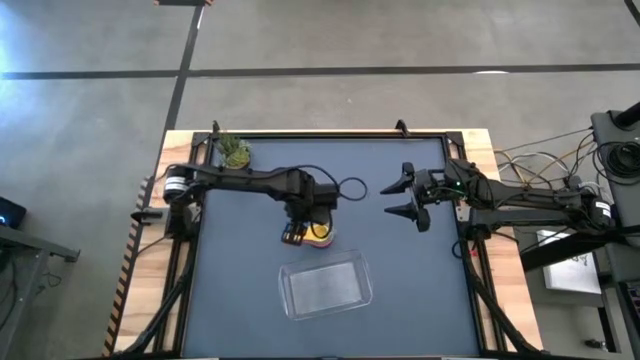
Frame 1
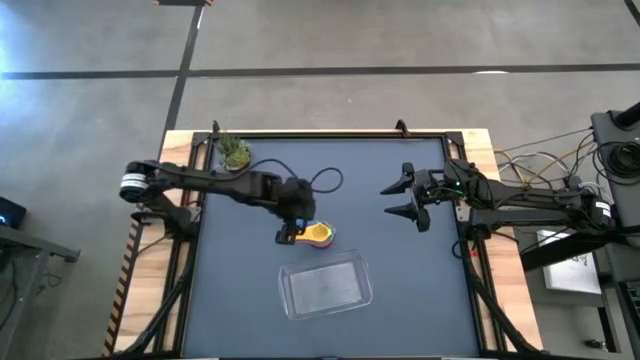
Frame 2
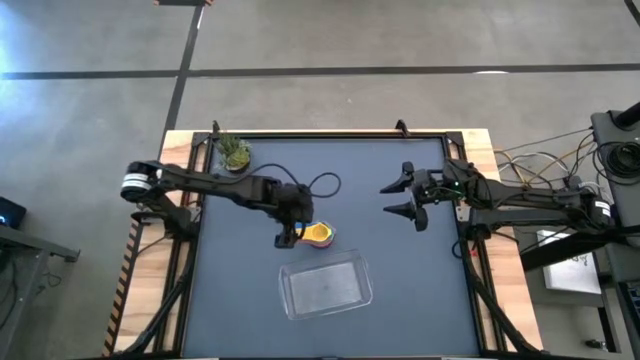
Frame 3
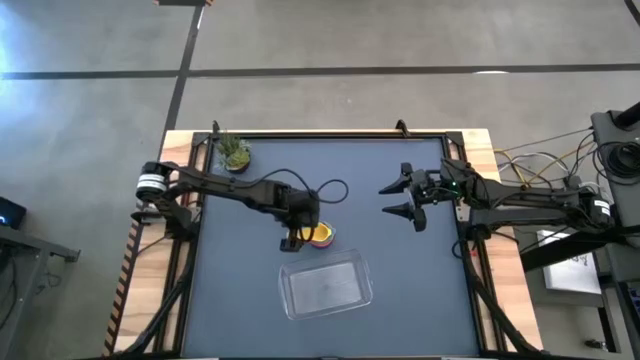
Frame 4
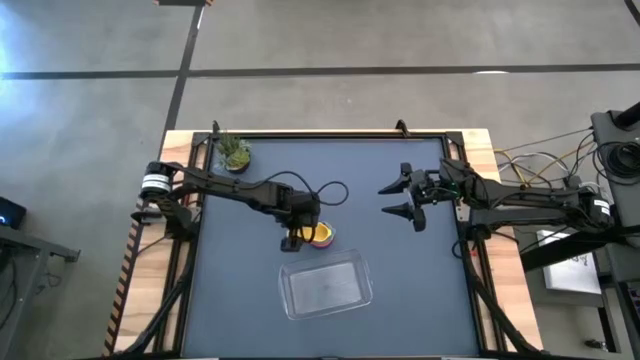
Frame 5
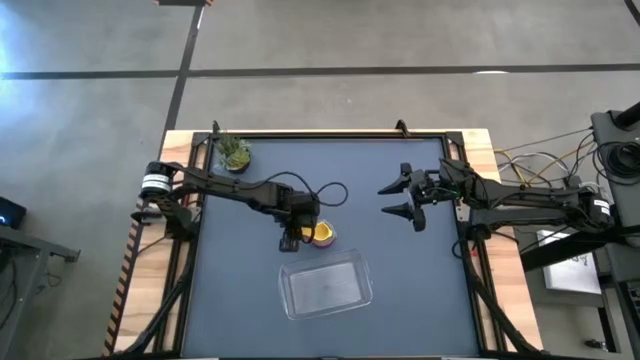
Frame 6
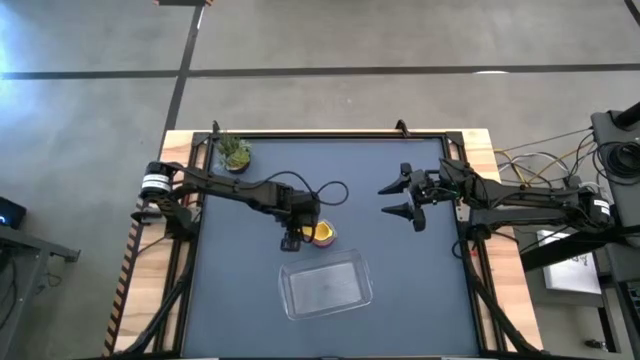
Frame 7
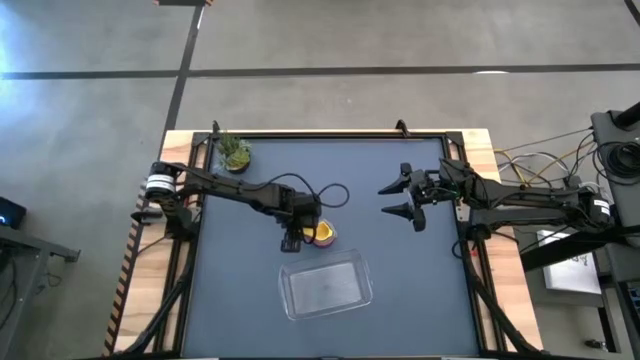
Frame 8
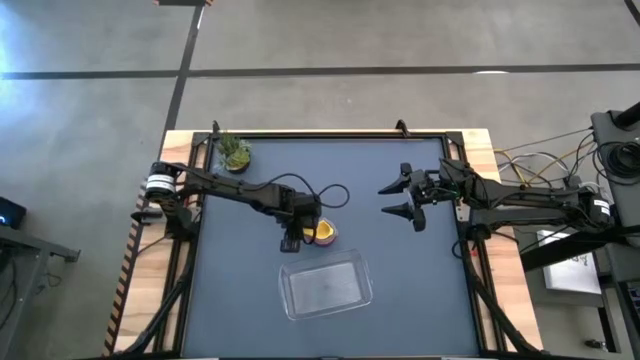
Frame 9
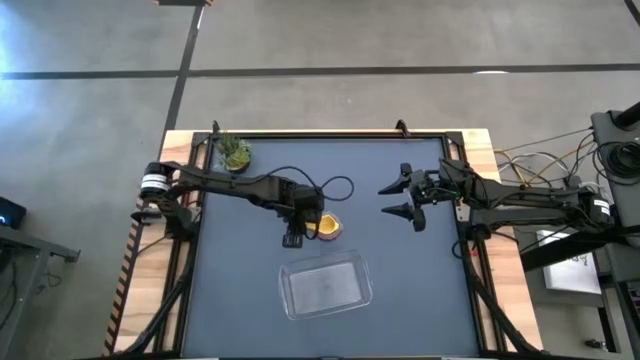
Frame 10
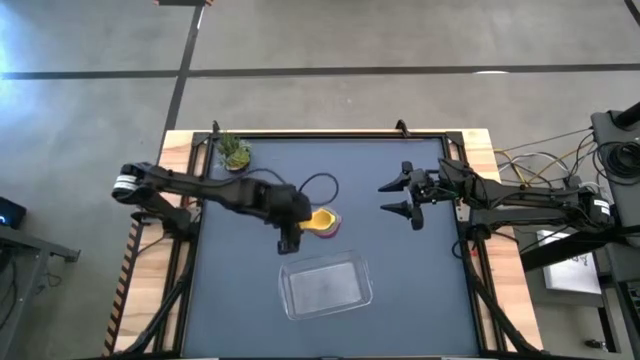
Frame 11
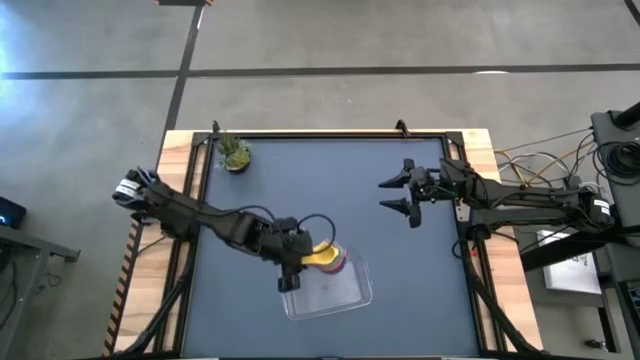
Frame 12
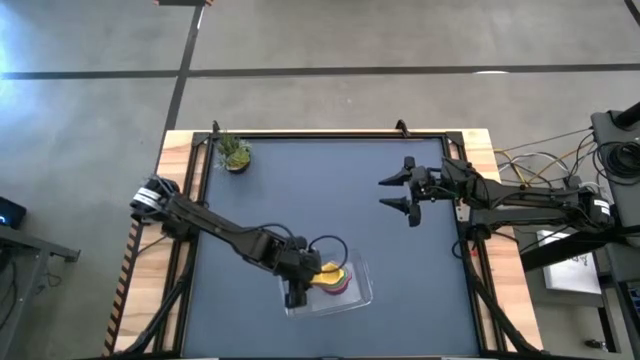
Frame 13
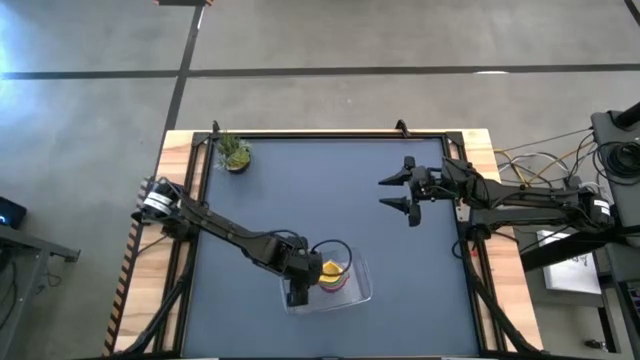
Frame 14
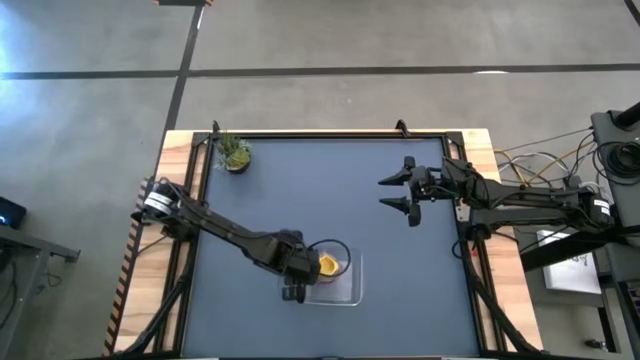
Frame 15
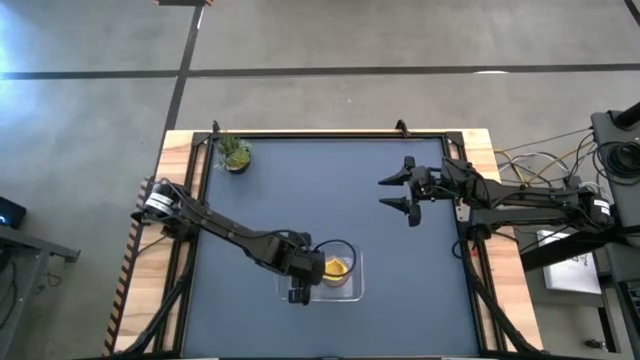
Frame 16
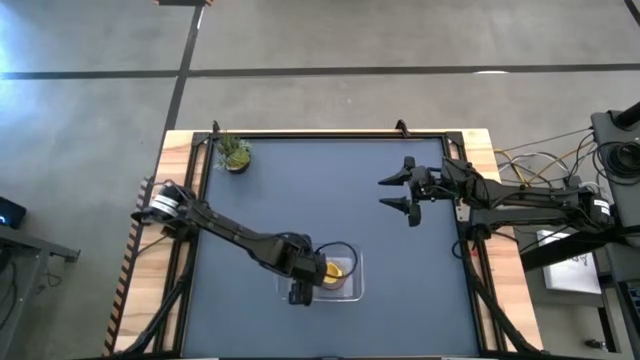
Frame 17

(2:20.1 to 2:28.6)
Task: Nest measuring cups in basket
Put the nested measuring cups into the transparent bin

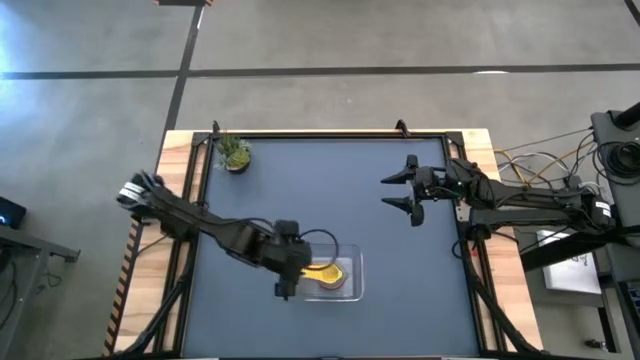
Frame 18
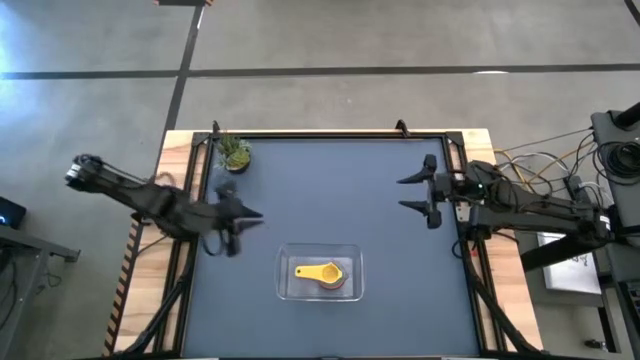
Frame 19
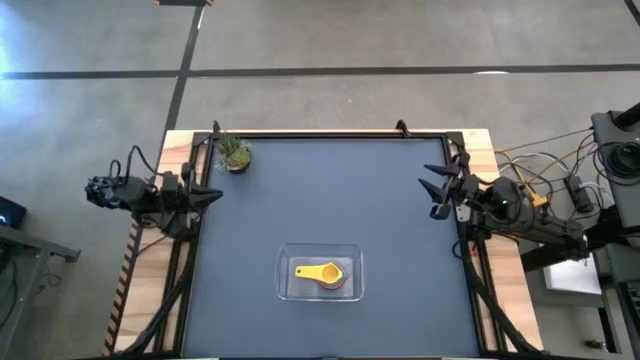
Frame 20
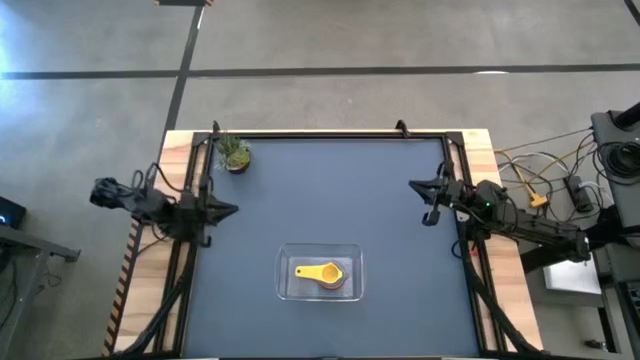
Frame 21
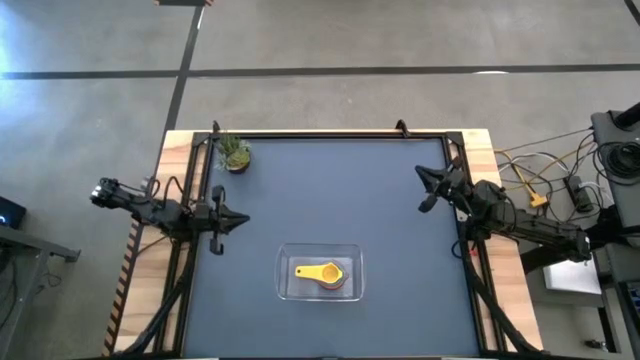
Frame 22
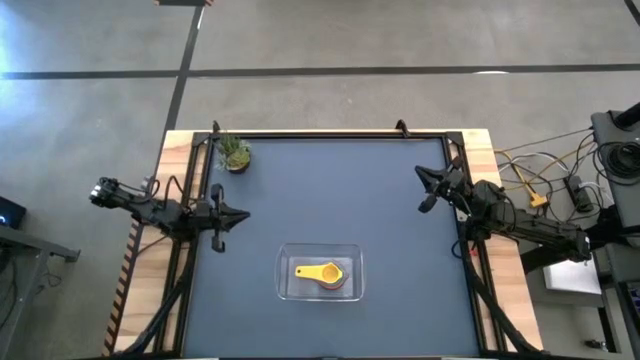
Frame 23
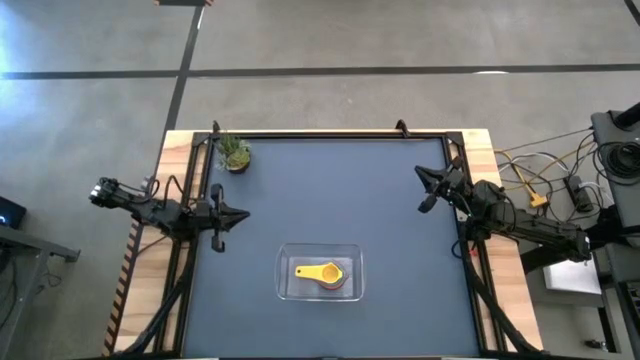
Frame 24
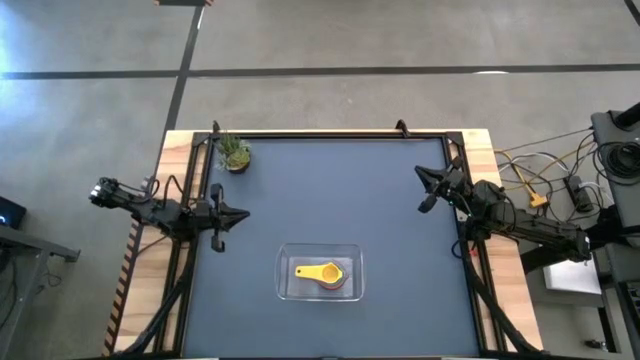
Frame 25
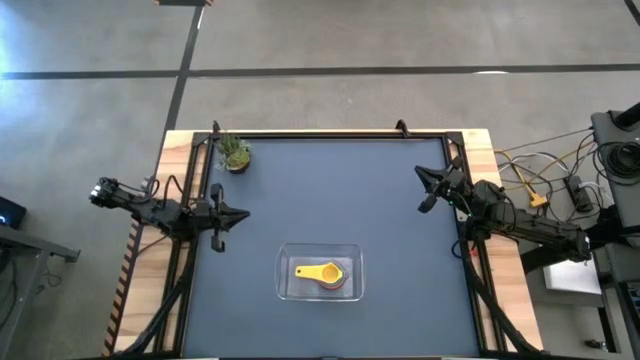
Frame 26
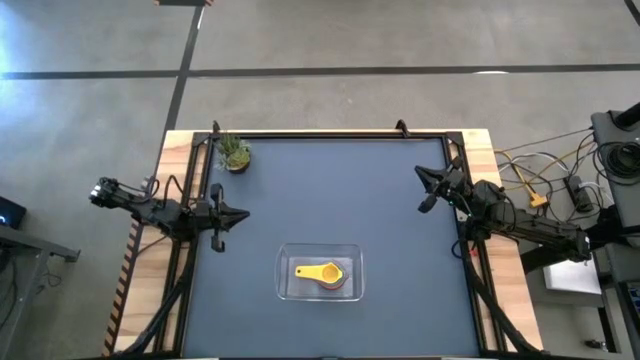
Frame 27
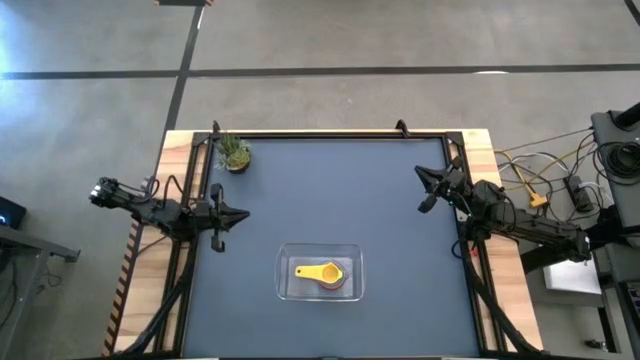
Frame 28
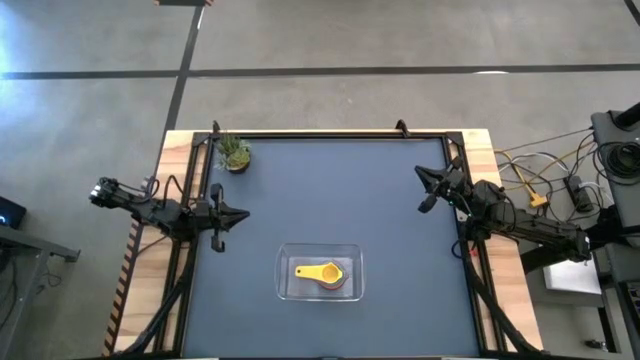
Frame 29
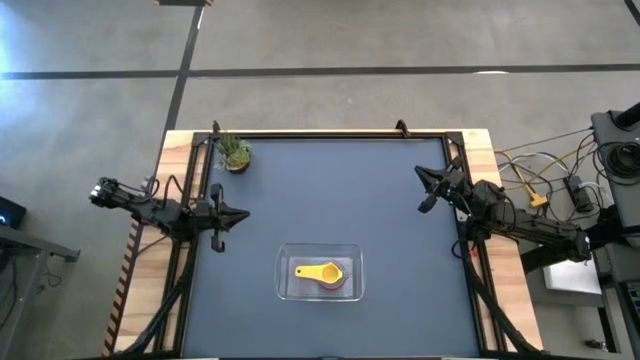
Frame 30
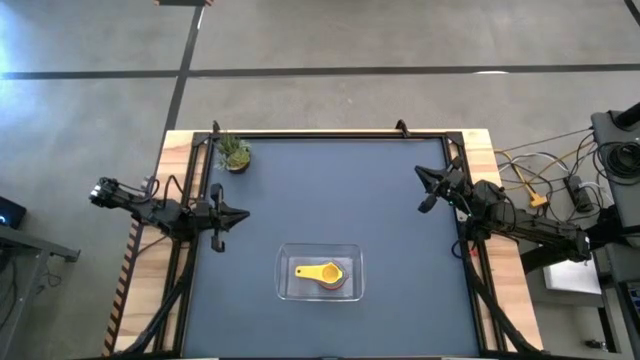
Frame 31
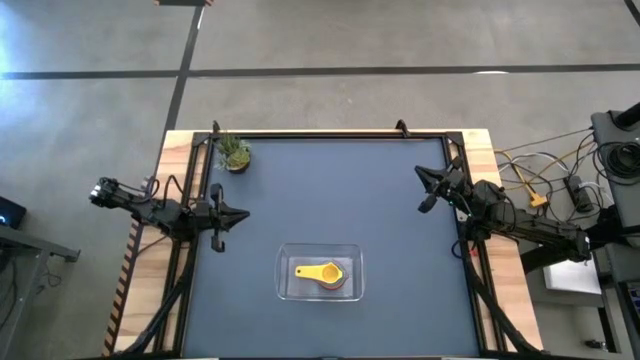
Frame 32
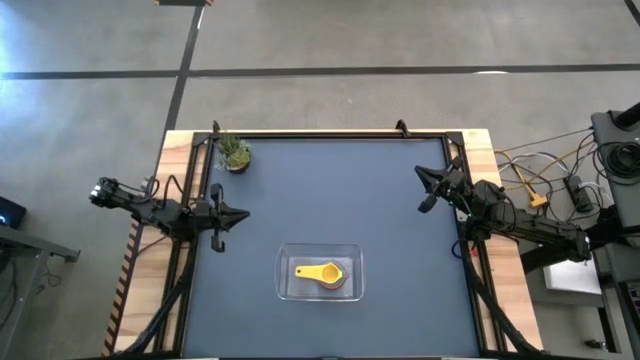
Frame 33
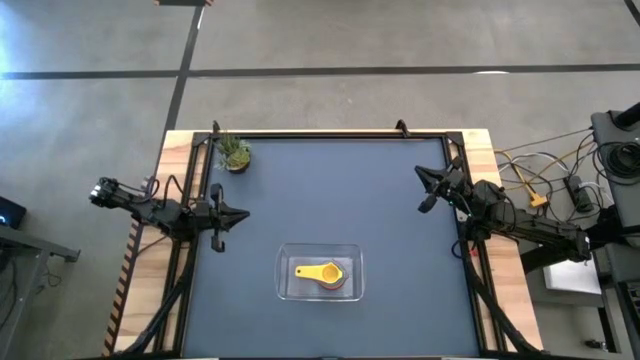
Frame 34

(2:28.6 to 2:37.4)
Return to Home Position

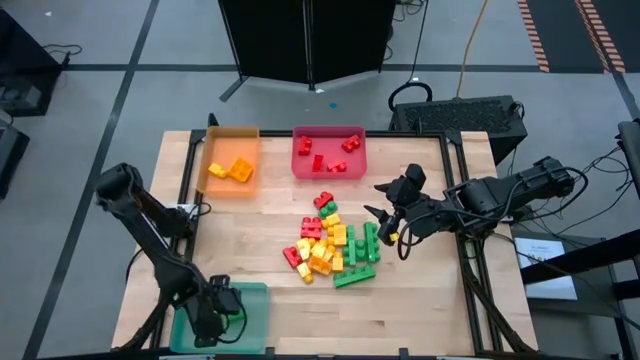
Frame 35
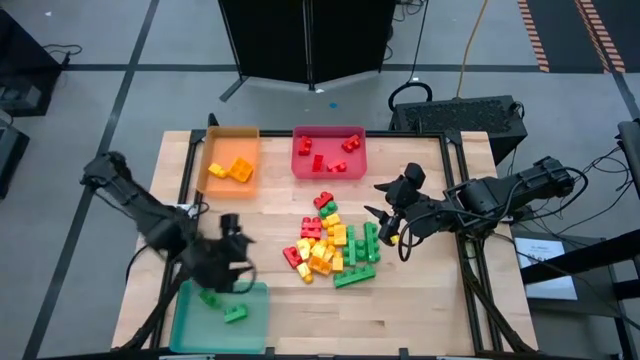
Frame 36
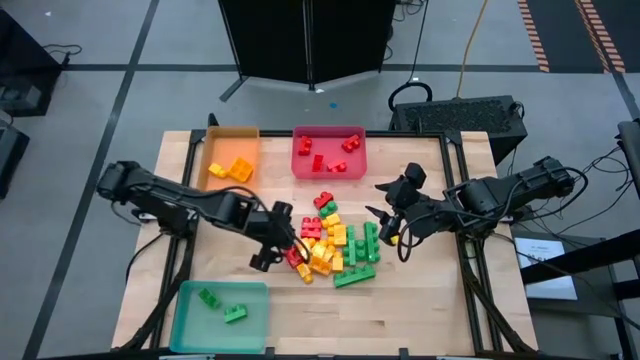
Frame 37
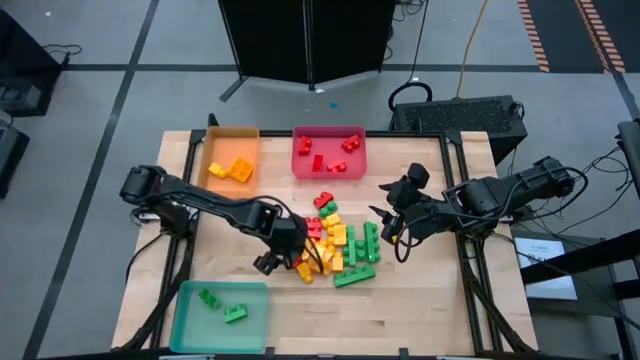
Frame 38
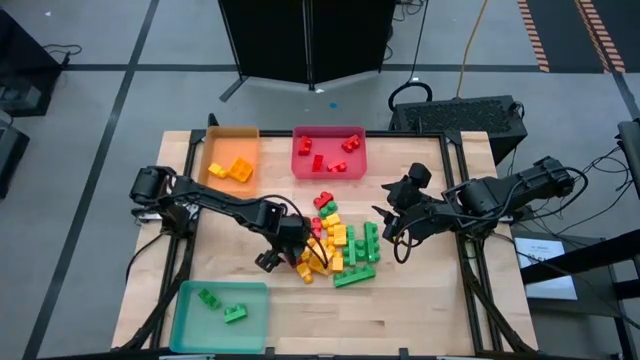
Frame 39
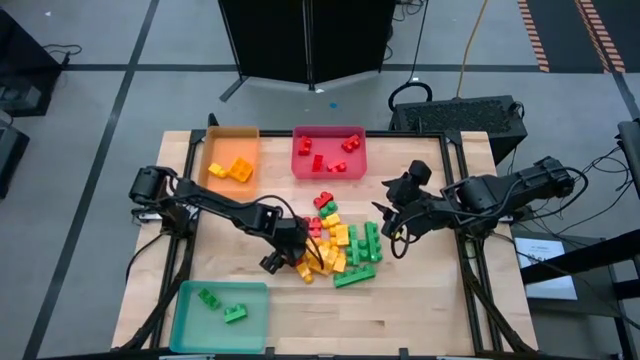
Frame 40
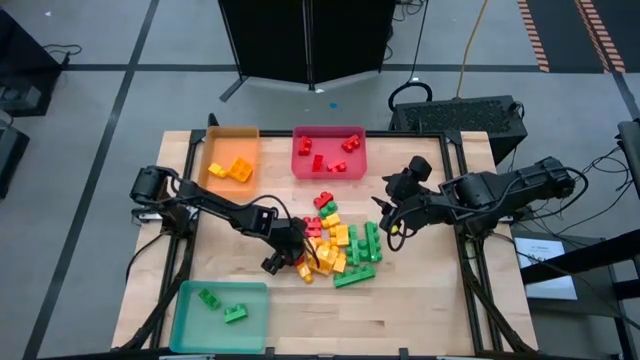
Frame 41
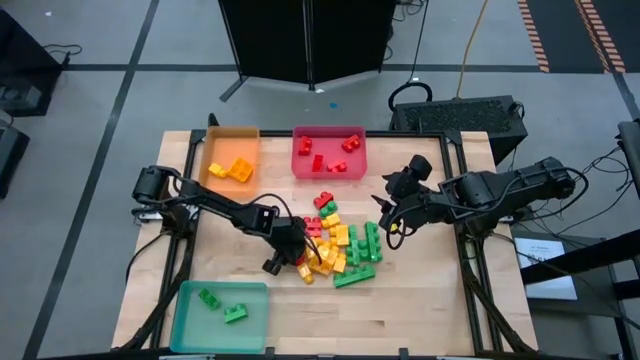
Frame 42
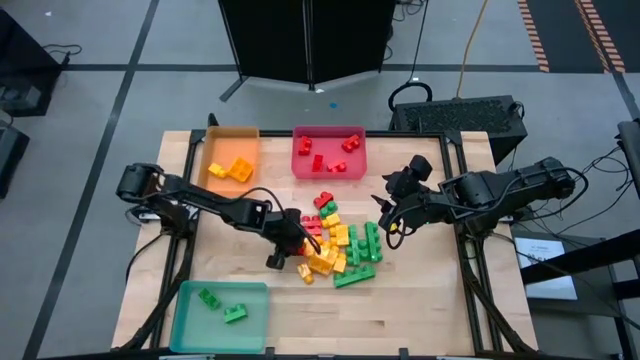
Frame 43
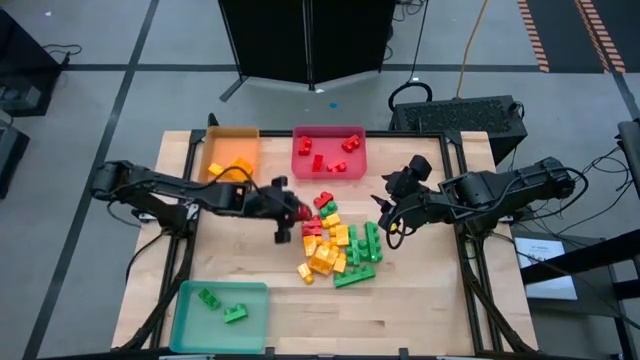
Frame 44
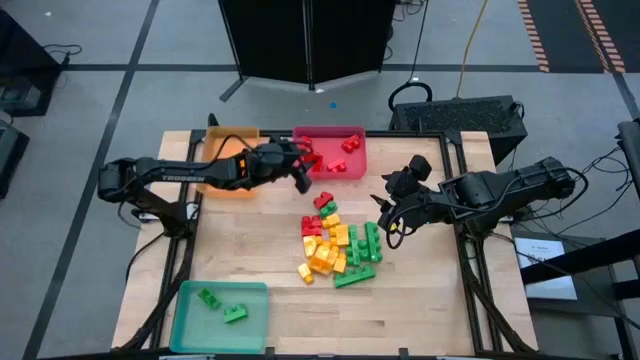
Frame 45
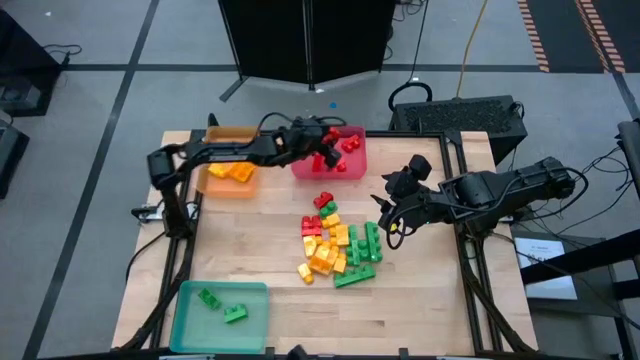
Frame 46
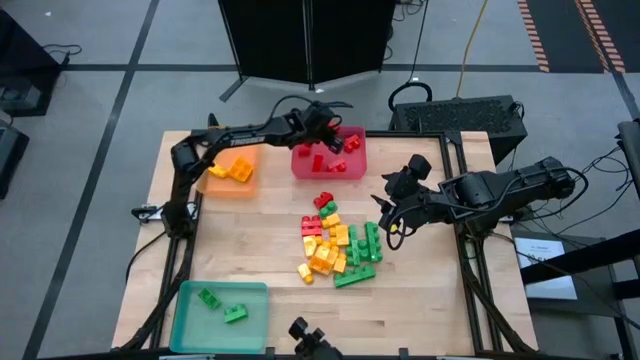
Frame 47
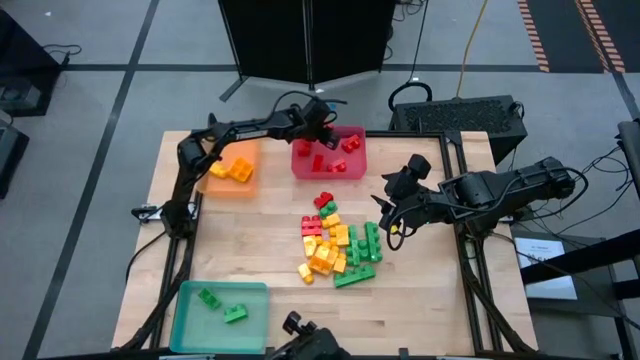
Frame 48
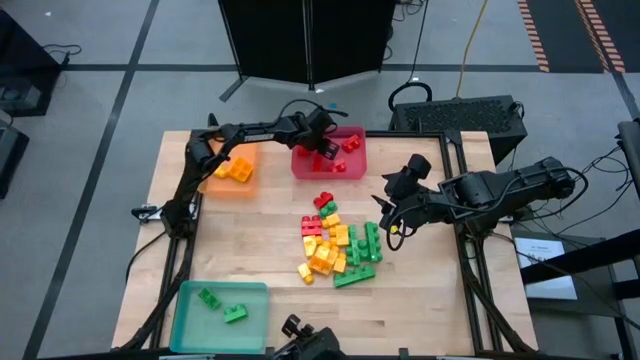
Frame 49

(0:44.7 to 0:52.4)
Task: Sort blocks
Put the red game piece into the red bin
